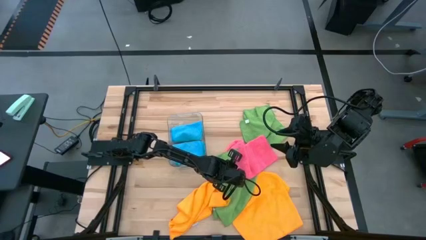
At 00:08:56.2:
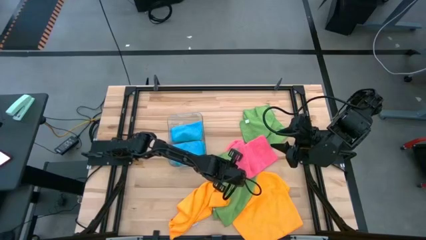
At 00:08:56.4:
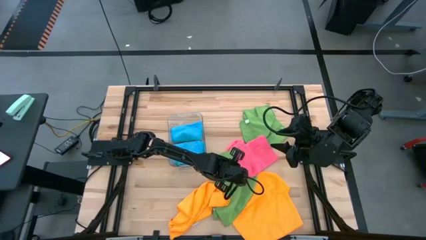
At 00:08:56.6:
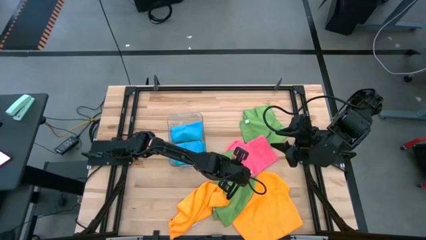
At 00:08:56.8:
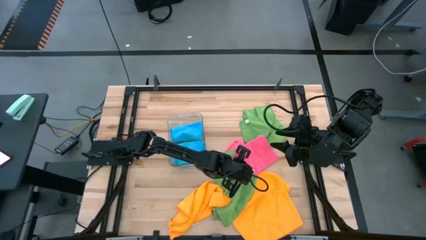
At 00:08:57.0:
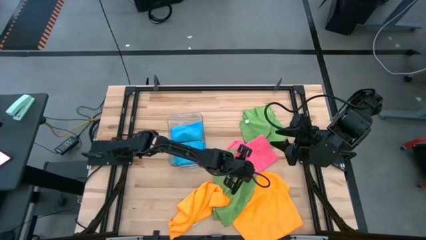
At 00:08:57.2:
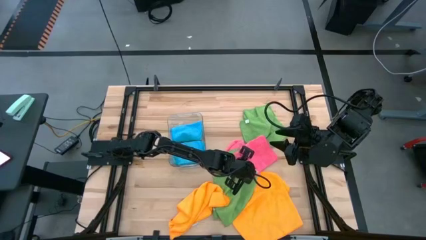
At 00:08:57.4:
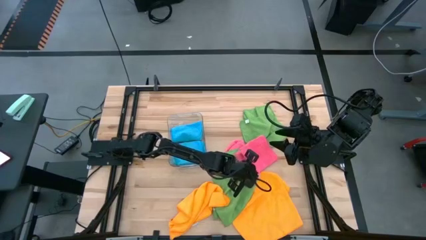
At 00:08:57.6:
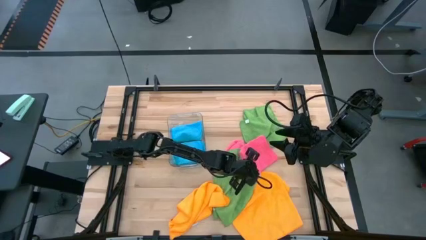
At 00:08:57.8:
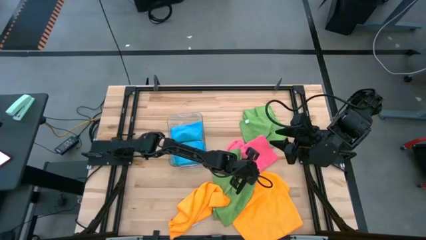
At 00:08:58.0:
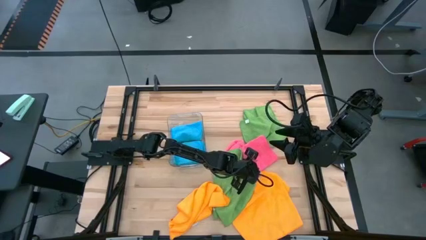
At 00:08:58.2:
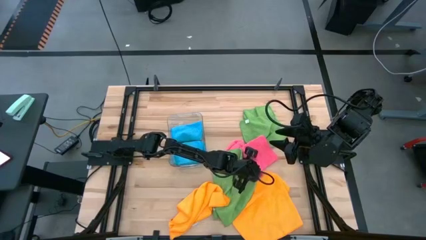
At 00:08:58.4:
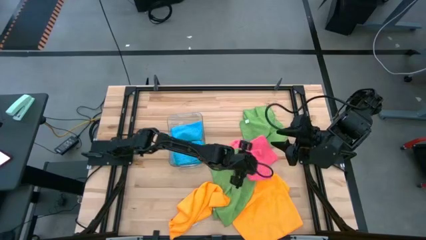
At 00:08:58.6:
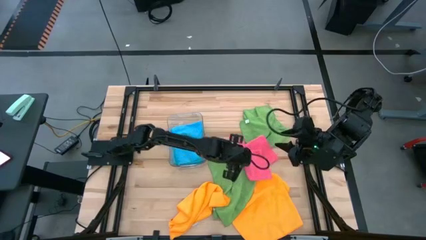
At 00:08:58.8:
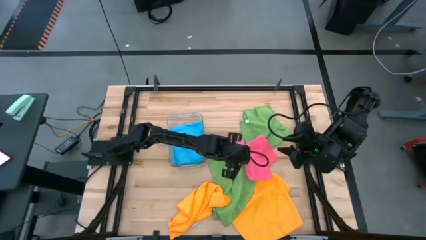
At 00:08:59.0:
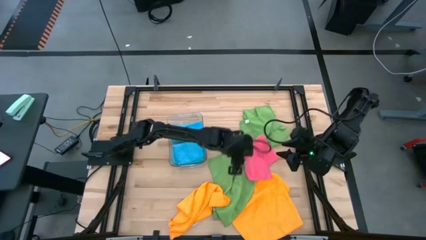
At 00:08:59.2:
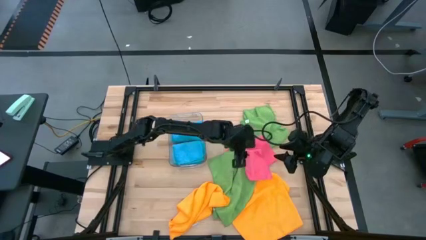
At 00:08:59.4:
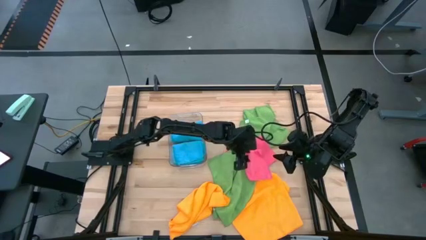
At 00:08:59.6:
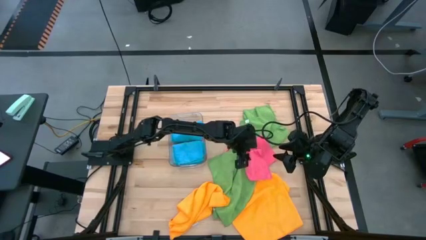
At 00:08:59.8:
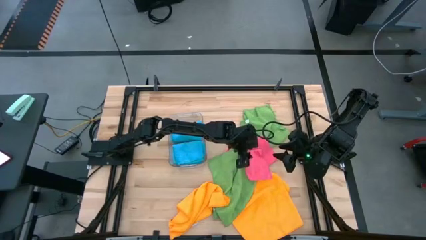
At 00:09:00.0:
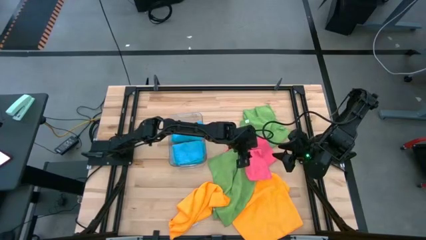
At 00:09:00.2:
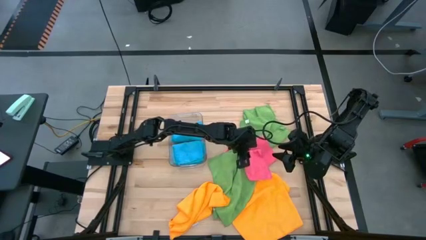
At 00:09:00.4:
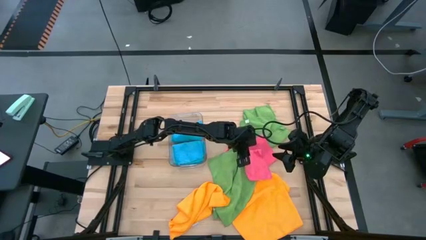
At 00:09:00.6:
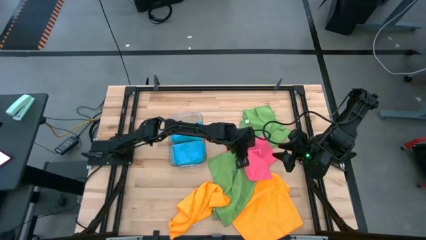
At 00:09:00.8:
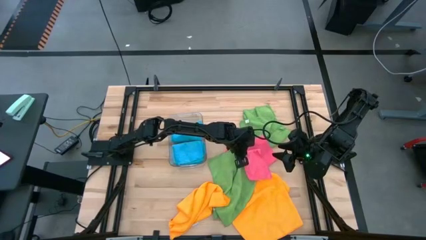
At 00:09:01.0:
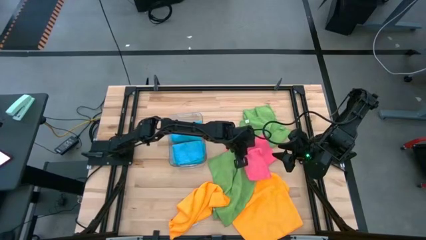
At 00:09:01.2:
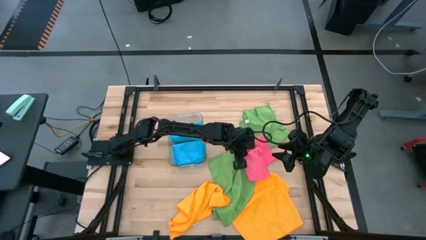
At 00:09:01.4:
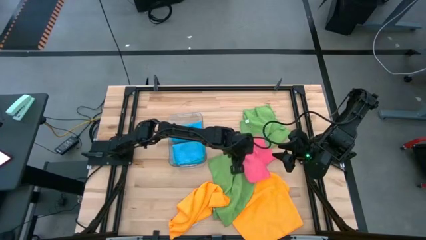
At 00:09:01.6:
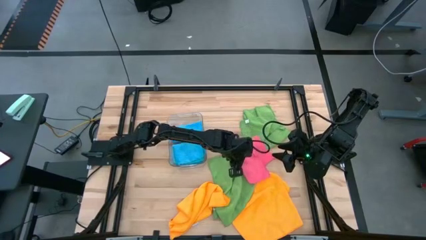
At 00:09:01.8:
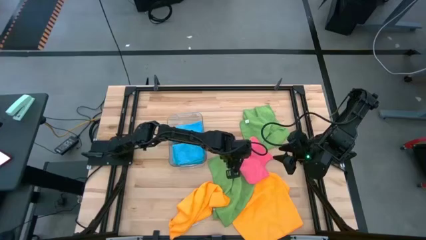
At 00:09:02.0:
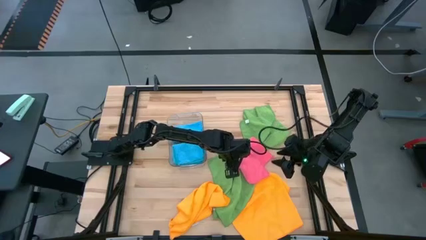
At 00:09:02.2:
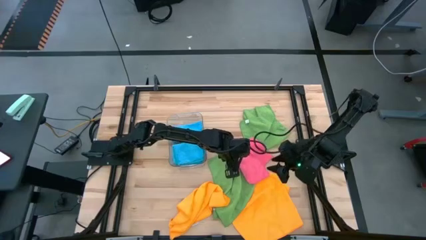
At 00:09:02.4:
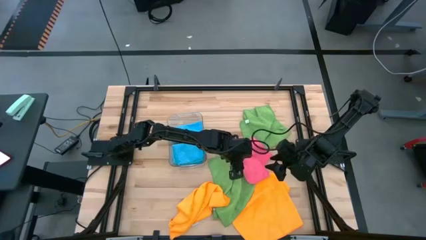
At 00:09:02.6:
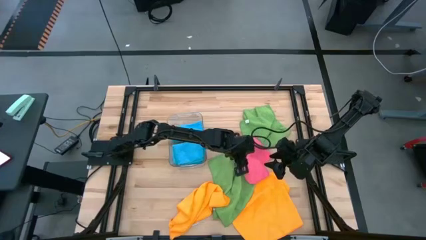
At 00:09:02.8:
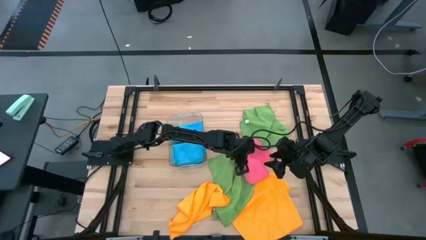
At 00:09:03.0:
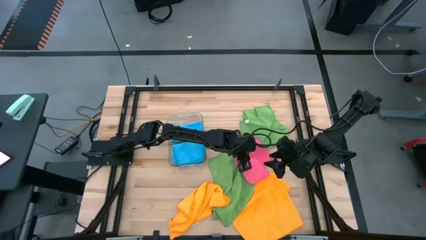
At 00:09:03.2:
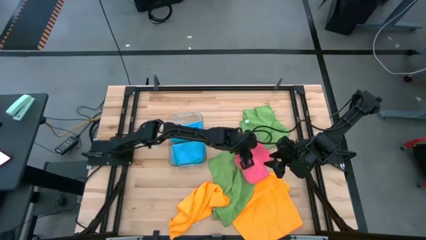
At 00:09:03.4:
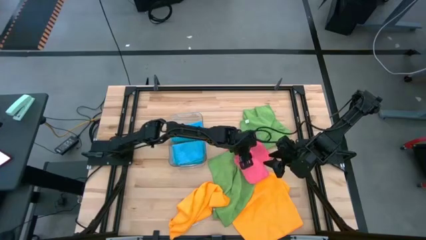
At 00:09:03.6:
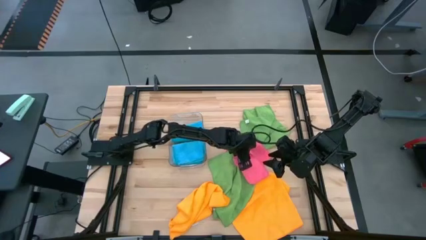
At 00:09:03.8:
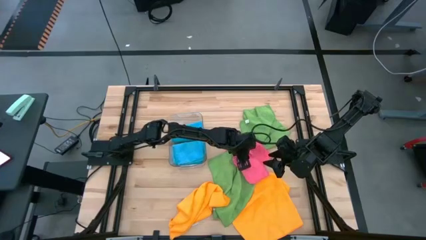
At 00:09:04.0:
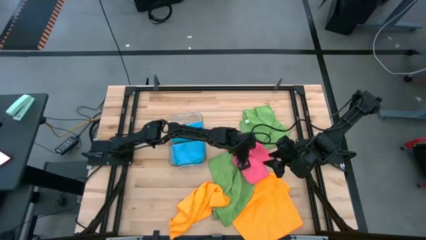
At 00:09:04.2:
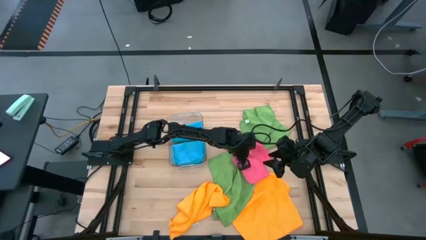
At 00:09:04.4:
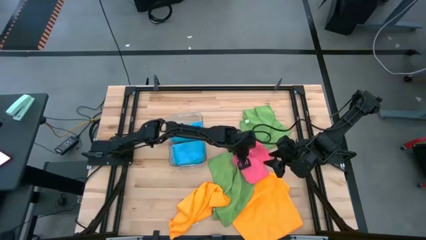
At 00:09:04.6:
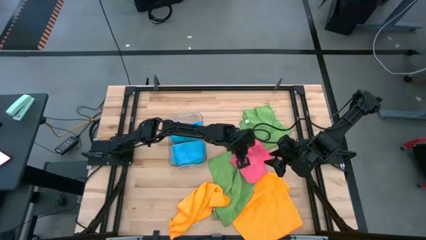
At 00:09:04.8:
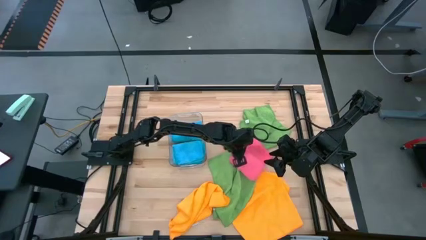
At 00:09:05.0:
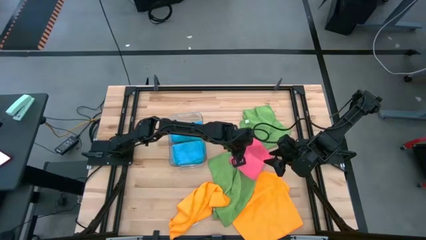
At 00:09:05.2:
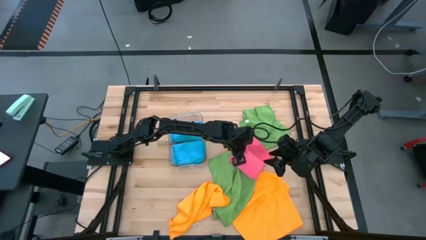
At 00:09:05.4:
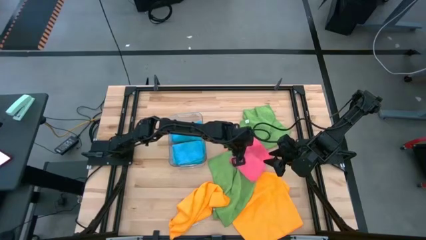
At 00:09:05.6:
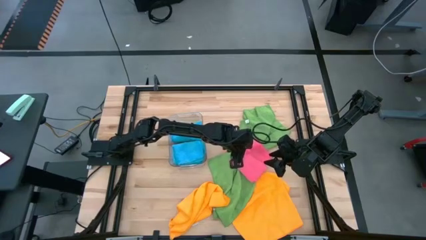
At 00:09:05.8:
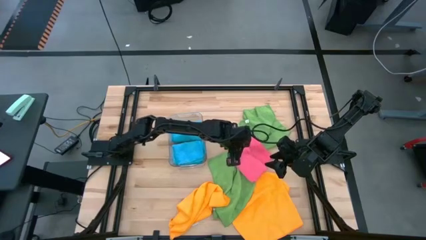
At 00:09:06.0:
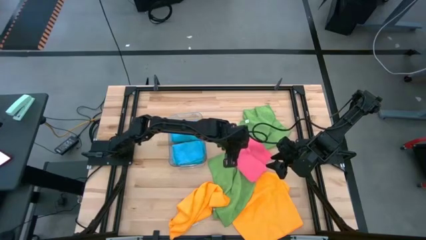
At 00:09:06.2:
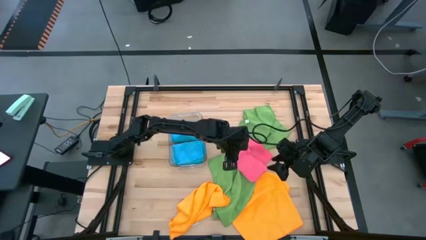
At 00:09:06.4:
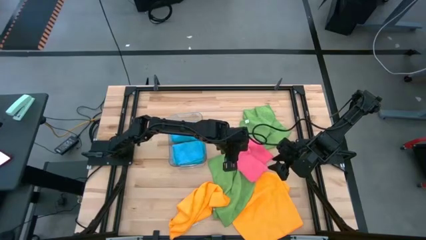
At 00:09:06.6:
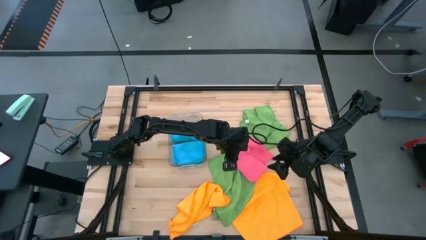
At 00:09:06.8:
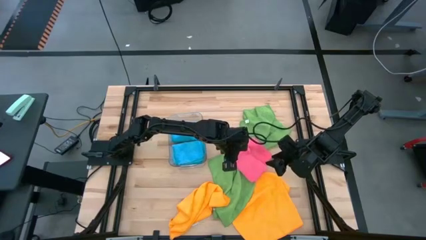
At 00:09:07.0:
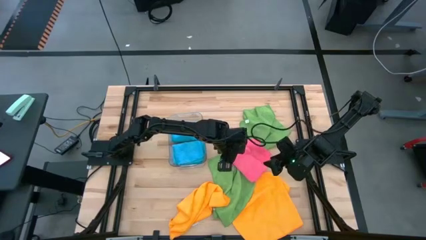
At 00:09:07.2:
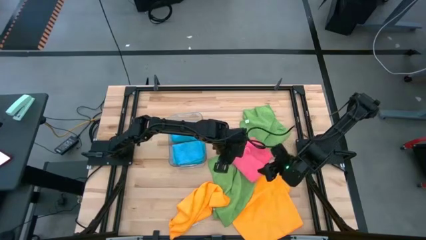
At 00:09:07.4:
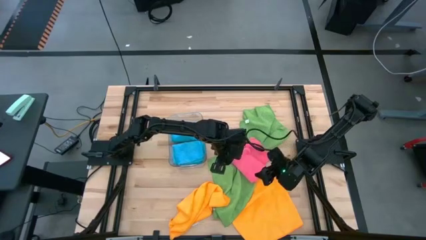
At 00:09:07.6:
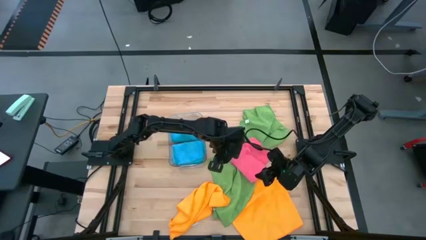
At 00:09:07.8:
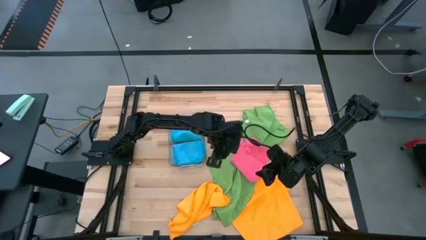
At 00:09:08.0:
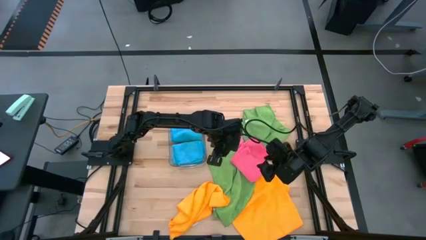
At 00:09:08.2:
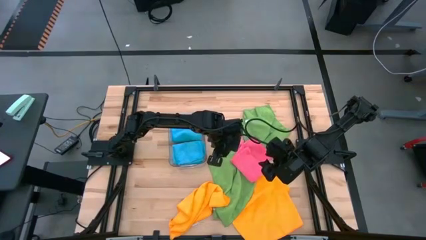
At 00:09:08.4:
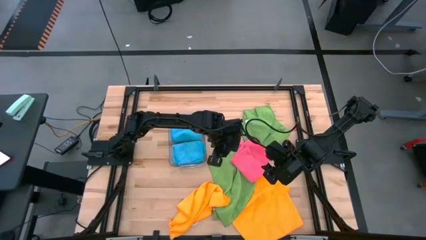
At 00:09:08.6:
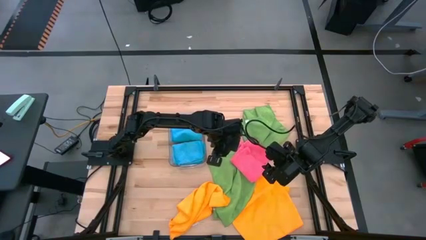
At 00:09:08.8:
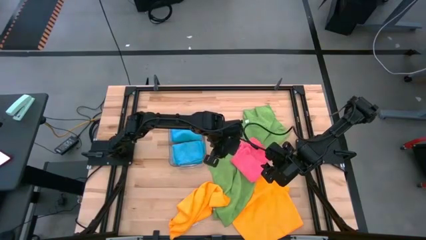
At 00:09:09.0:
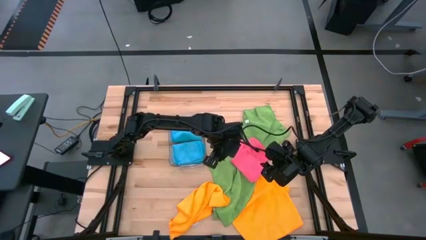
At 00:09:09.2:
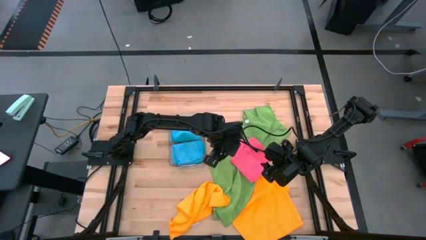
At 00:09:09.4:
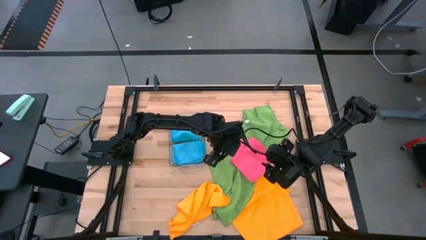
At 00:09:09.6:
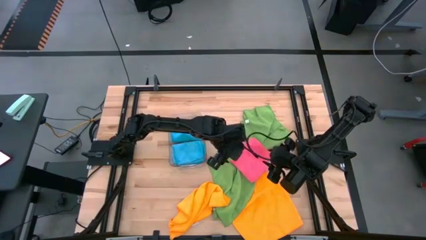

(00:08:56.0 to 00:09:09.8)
Task: Fold microfiber towels
Fold the top pink towel
